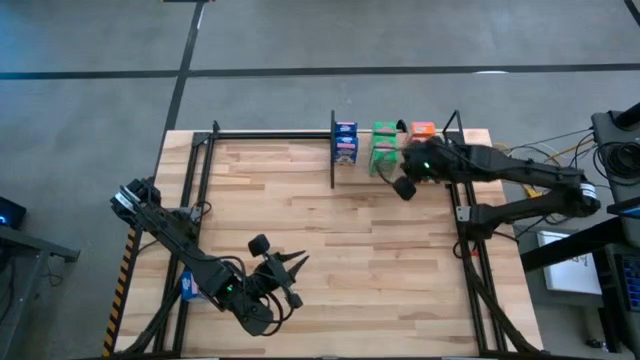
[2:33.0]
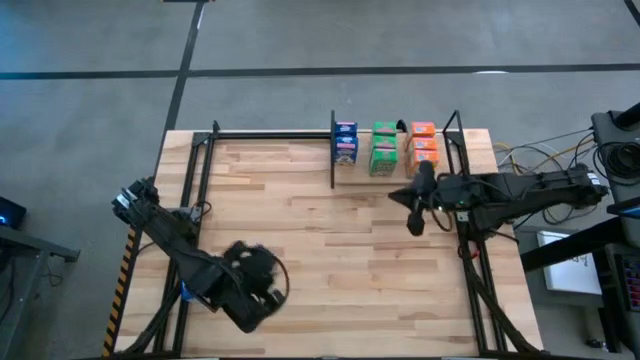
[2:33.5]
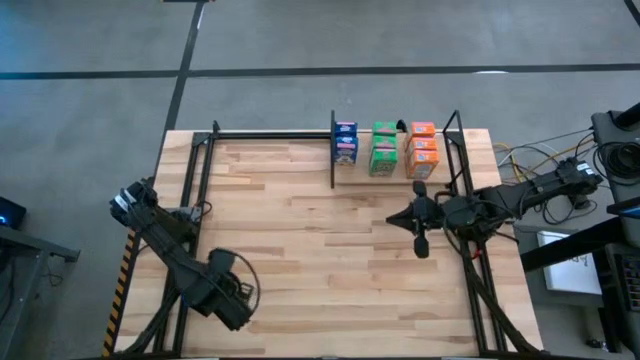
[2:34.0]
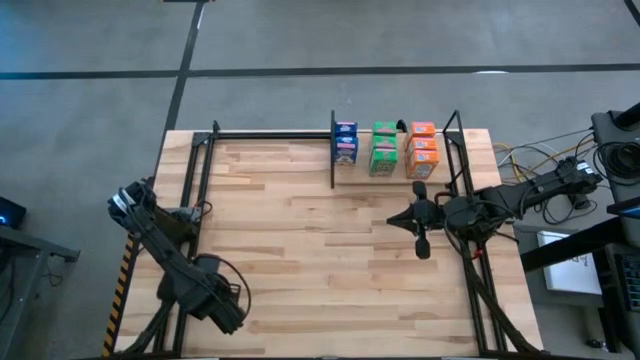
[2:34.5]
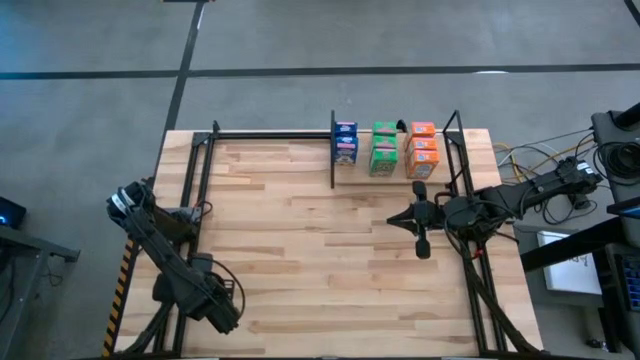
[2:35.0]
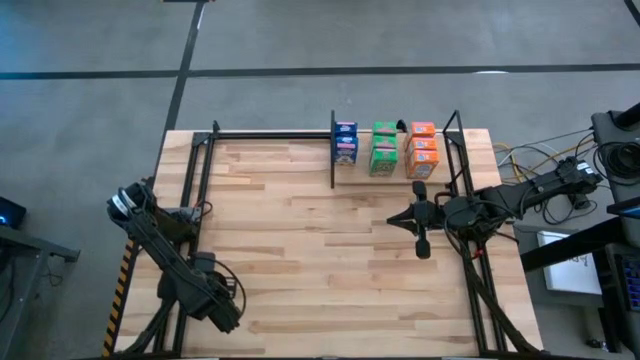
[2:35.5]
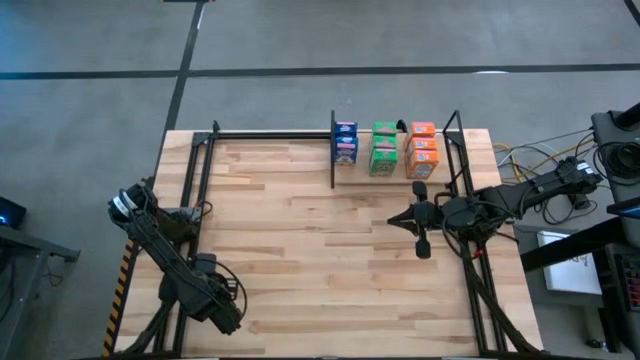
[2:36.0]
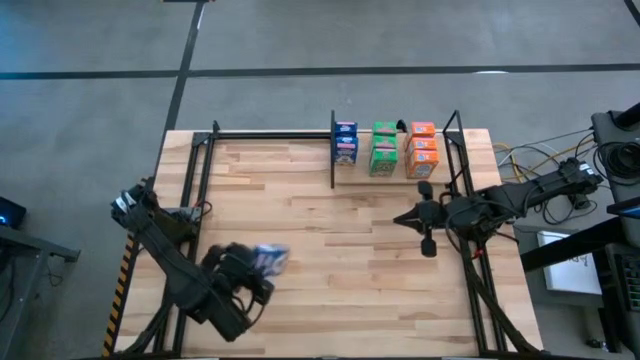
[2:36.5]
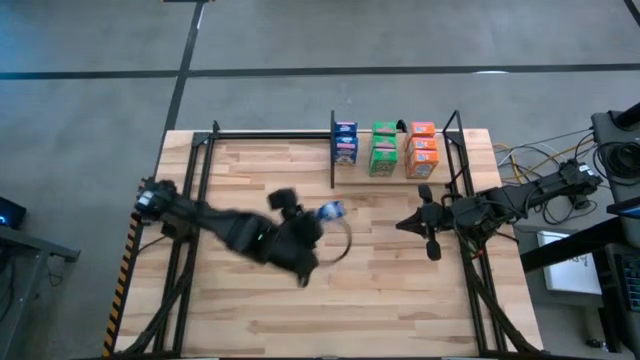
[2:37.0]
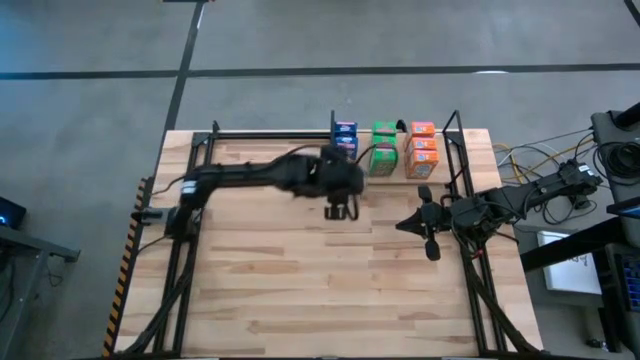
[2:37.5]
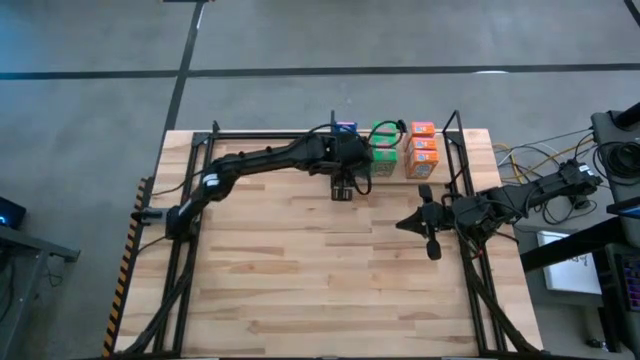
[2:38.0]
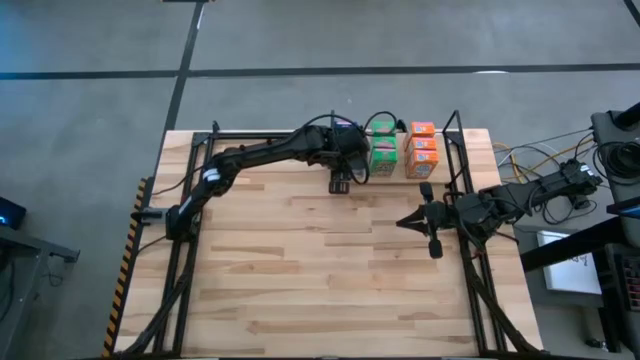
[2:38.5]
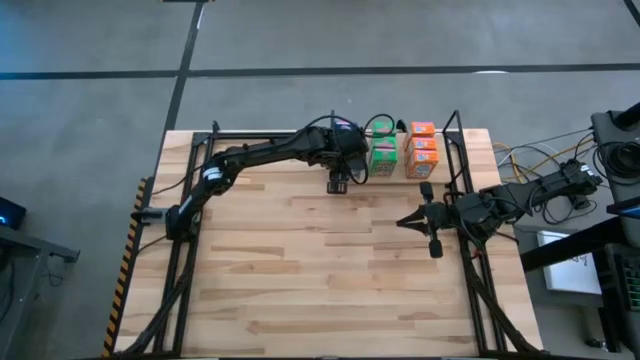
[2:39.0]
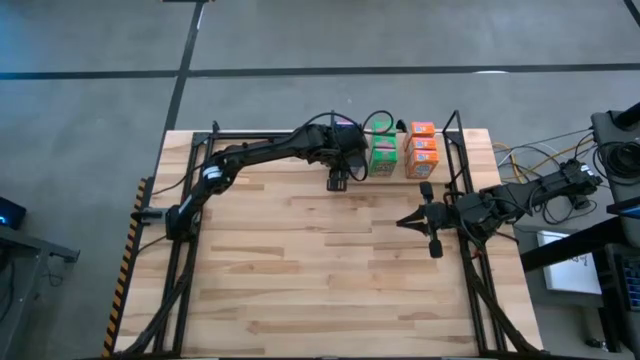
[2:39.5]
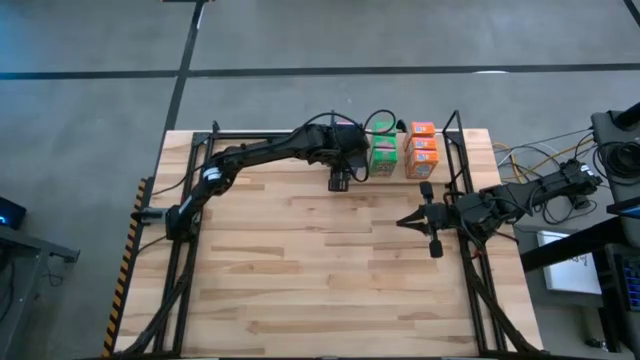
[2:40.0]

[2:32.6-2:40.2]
Task: Stack cereal on shelf
Put the blue cereal box on the shelf aligned with the other blue cereal box on the shelf

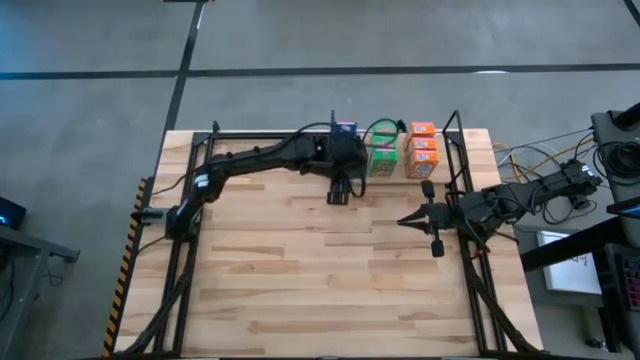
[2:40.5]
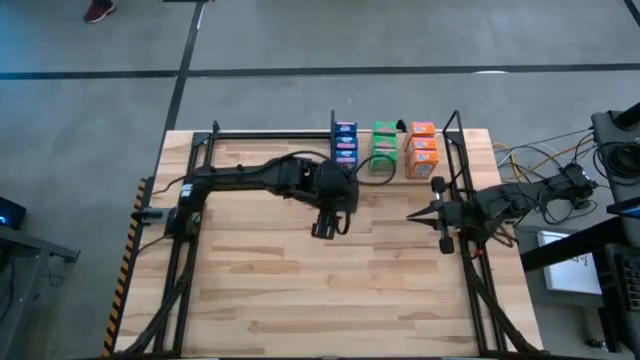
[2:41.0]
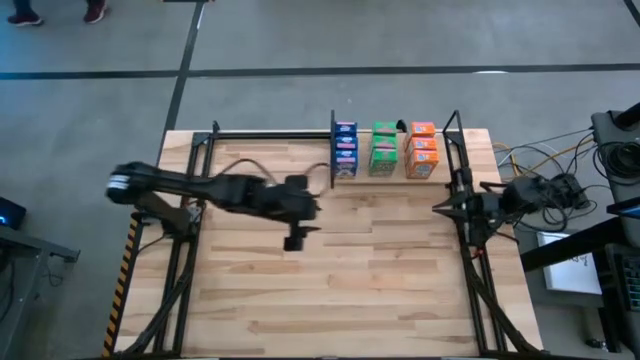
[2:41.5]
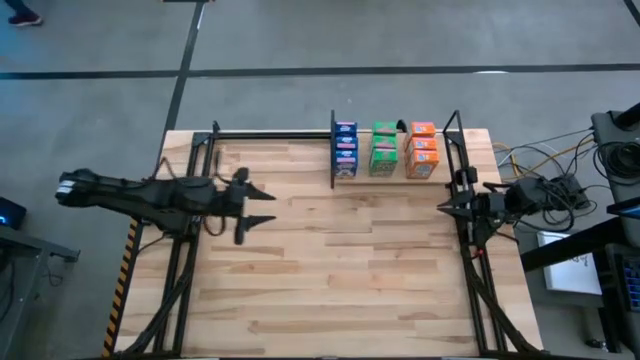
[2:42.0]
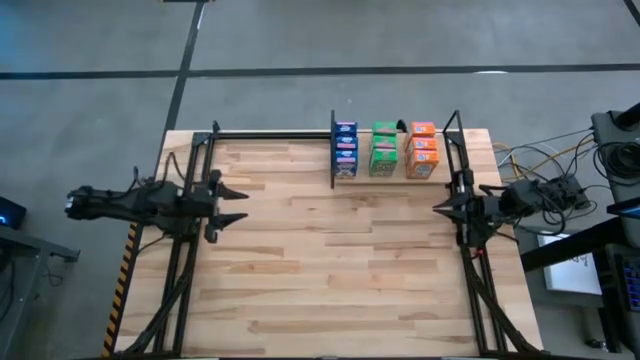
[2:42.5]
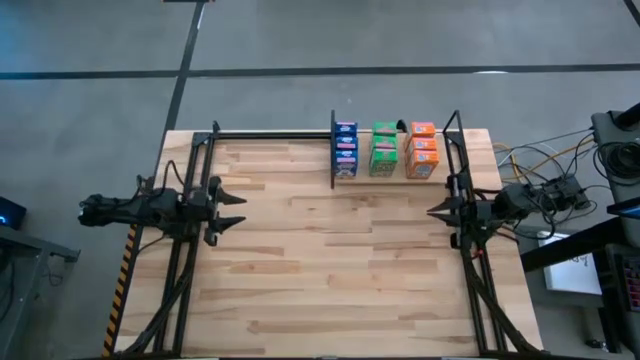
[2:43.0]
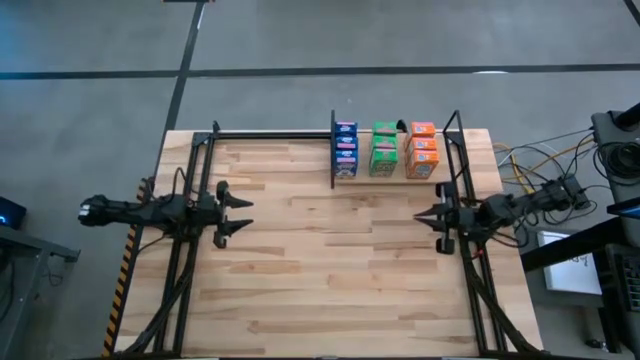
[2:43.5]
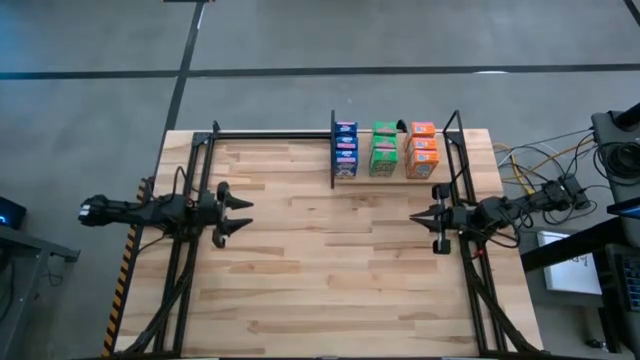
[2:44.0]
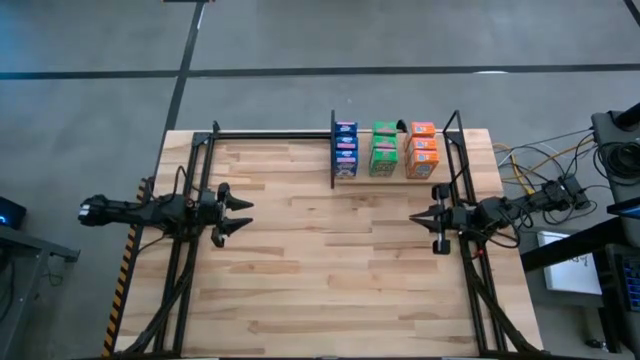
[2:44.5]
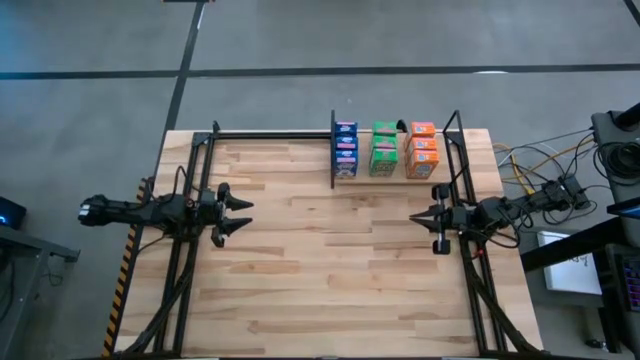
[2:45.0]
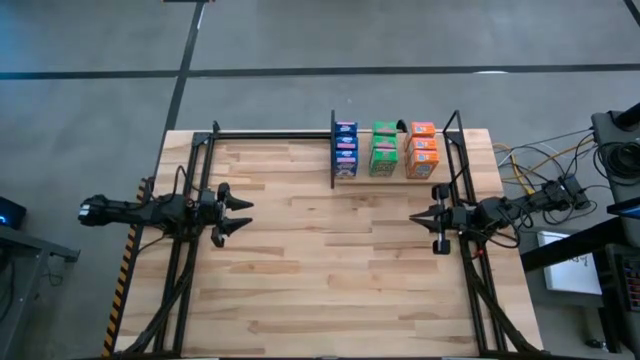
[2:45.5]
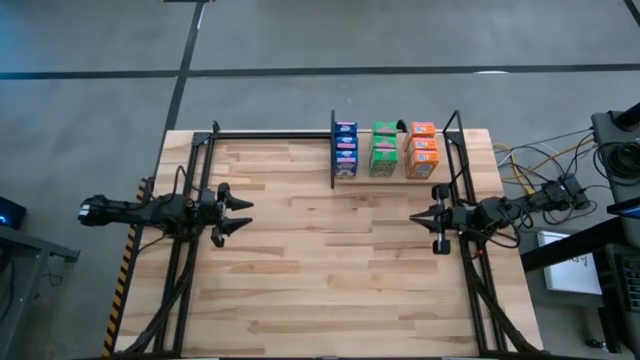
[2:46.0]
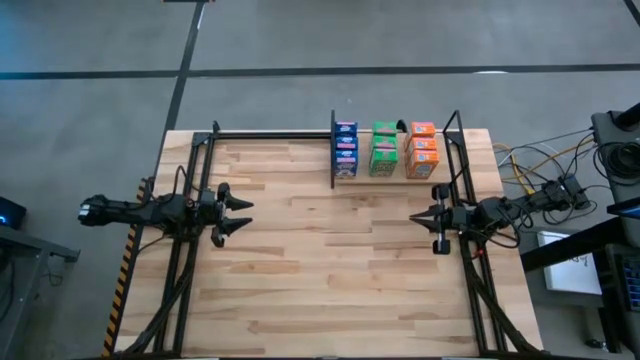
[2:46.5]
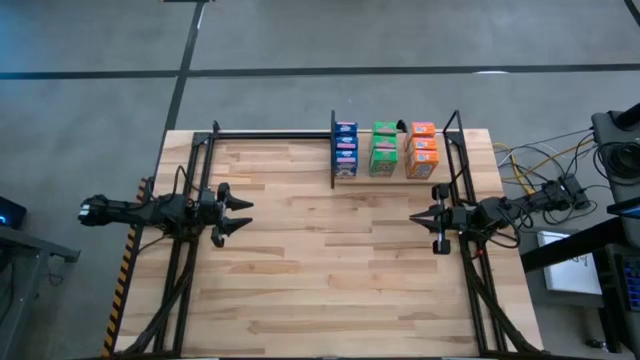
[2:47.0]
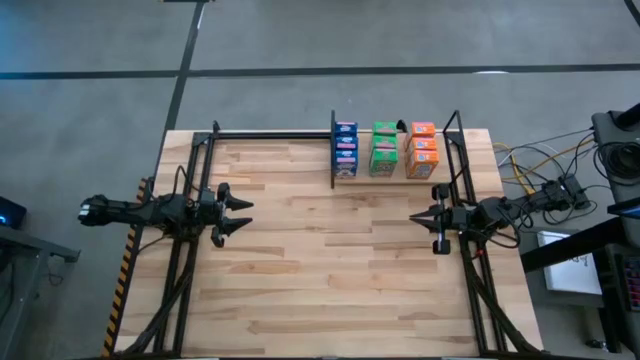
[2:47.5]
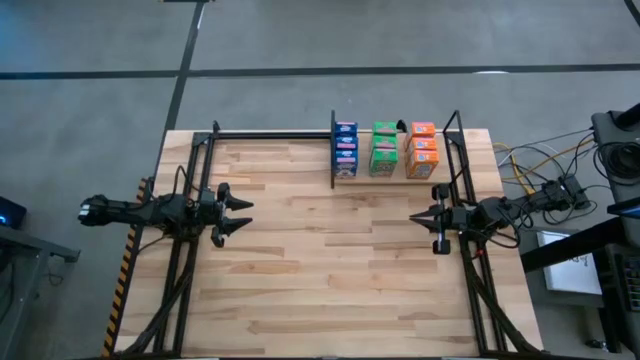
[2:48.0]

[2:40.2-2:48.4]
Return to Home Position

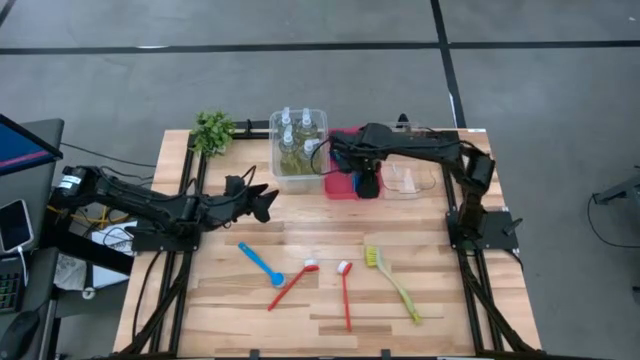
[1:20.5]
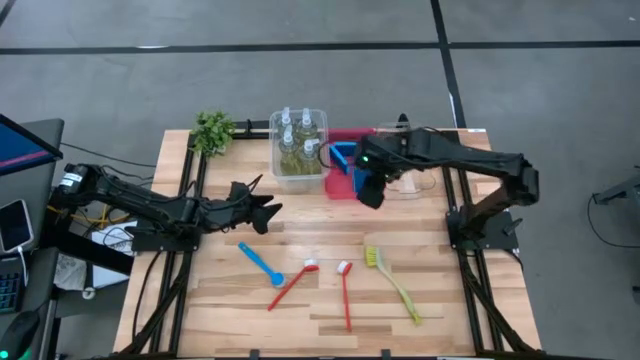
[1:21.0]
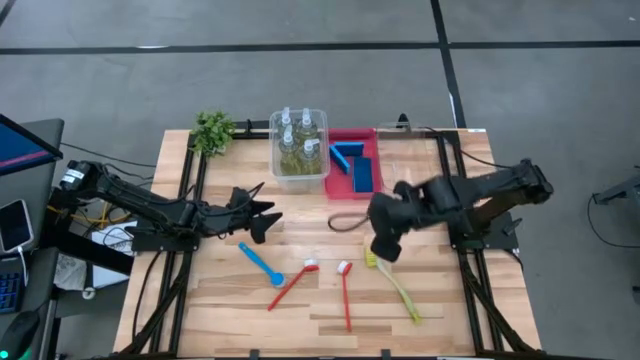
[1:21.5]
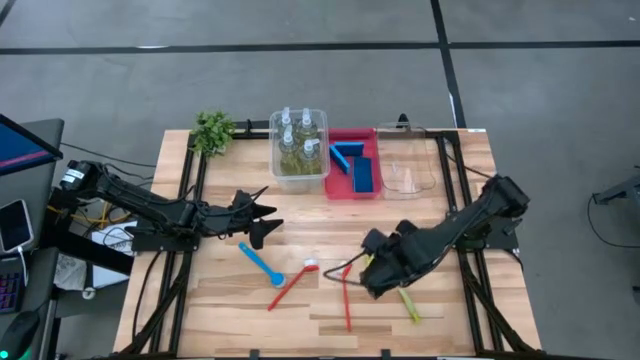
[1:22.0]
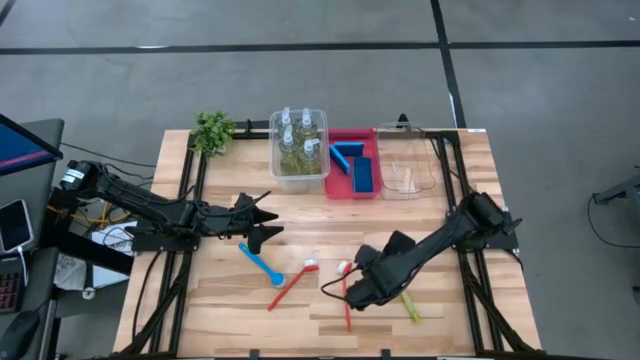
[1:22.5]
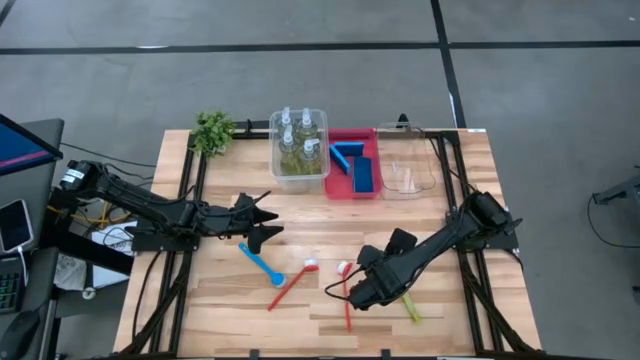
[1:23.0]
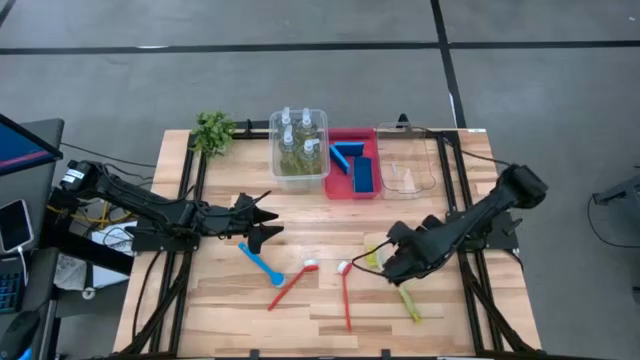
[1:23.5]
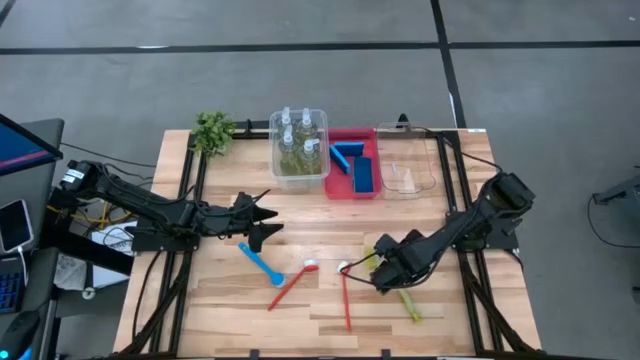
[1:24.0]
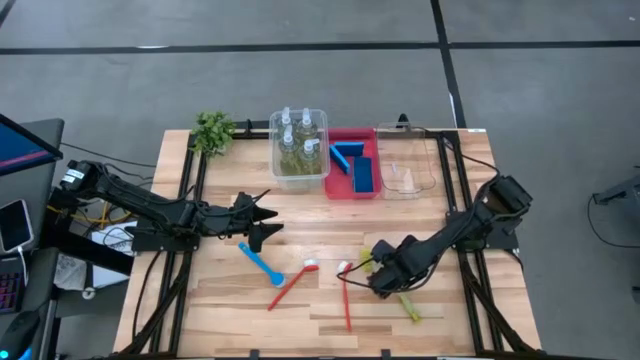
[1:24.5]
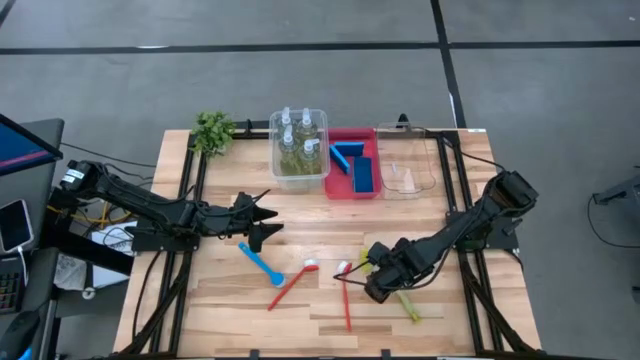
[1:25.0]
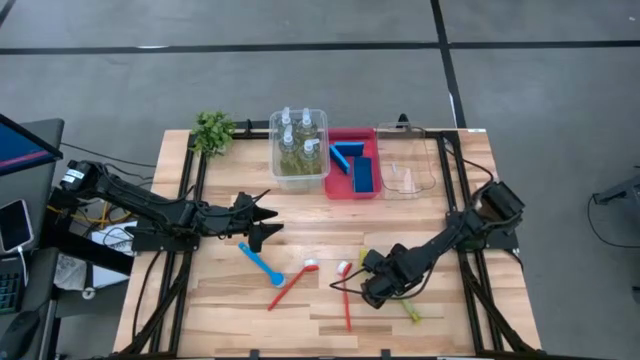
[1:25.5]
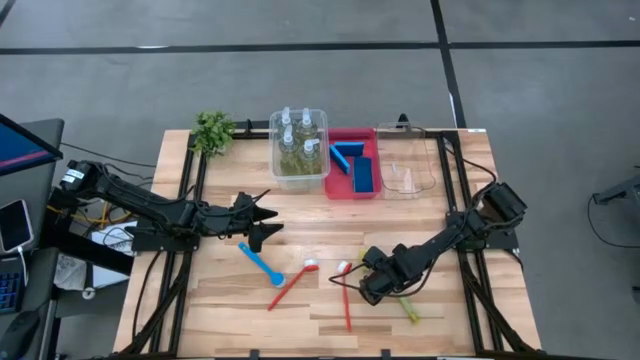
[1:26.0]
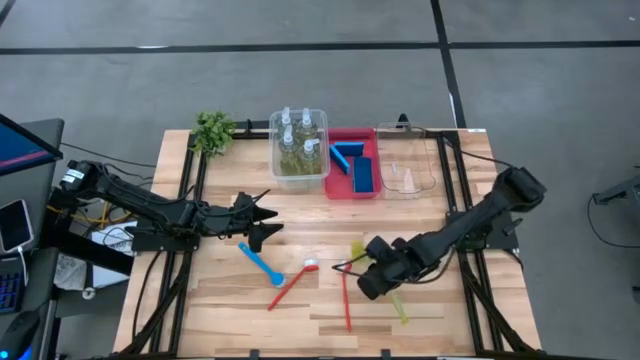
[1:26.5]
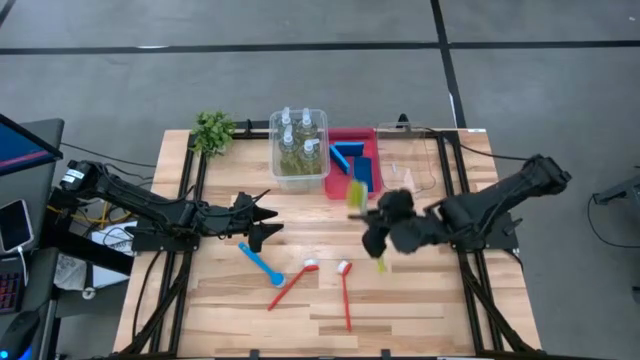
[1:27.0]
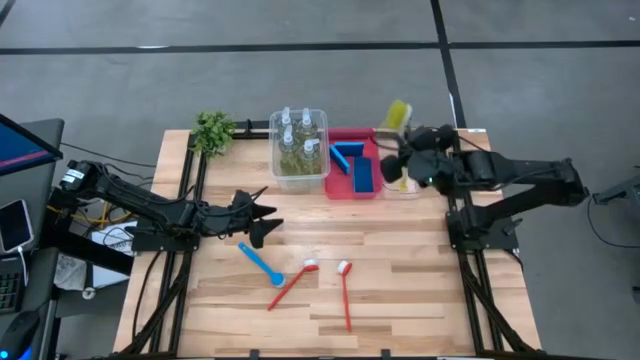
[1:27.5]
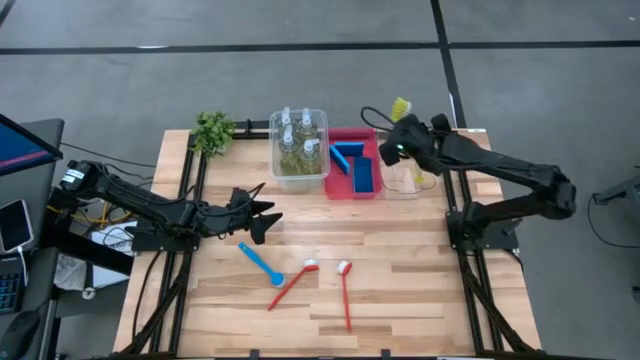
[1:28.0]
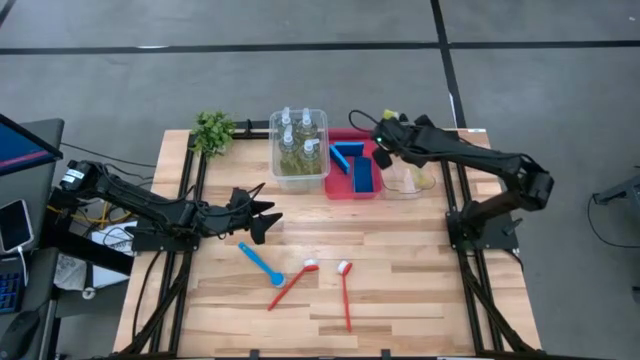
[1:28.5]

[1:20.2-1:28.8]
Task: Pick & Place Kitchen Sink Supplies
Put the yellow dish brush into the transparent bin
